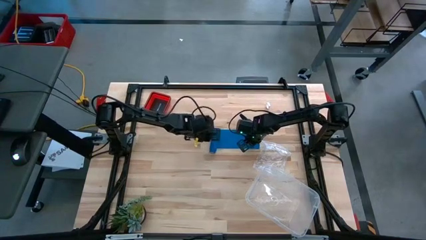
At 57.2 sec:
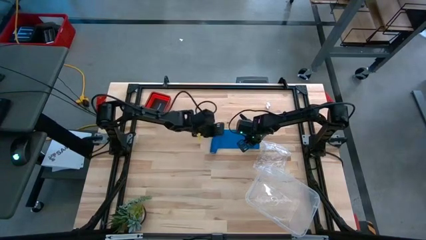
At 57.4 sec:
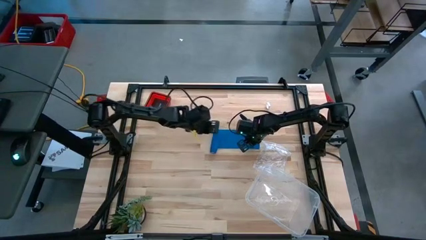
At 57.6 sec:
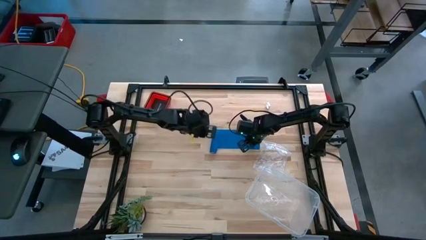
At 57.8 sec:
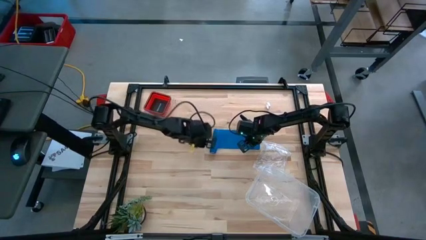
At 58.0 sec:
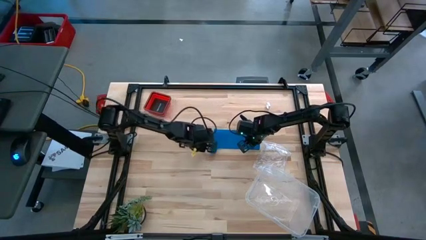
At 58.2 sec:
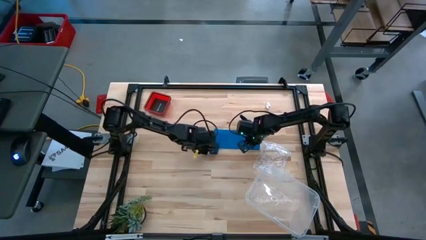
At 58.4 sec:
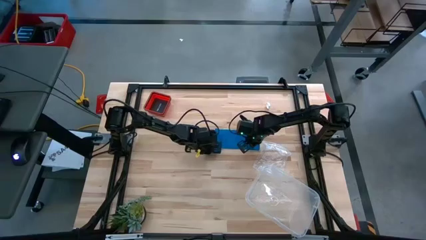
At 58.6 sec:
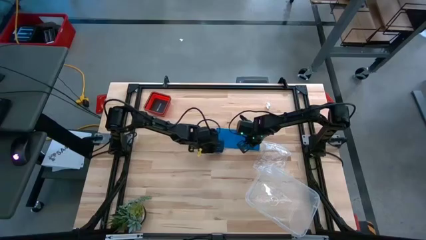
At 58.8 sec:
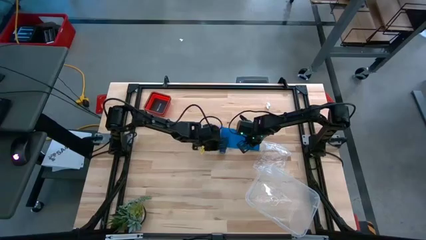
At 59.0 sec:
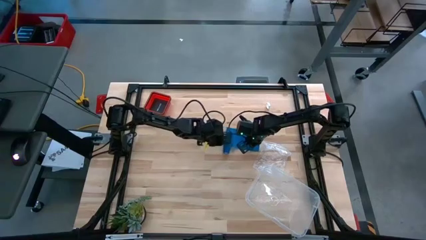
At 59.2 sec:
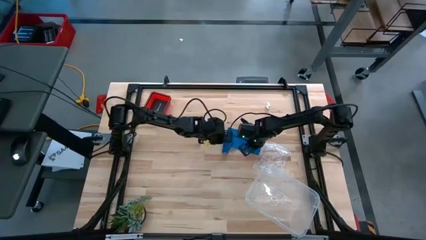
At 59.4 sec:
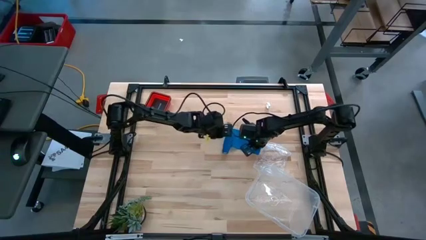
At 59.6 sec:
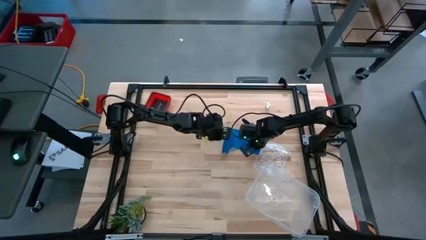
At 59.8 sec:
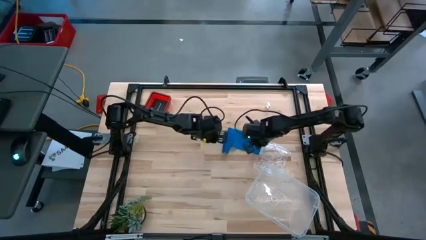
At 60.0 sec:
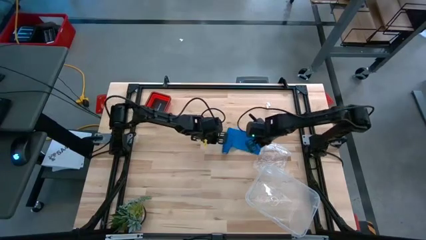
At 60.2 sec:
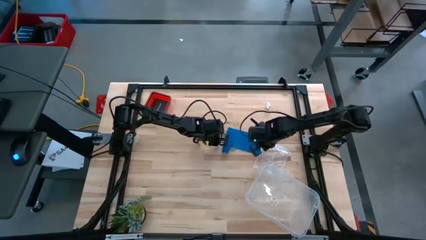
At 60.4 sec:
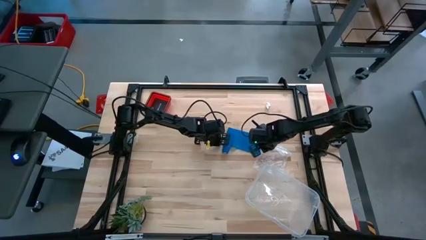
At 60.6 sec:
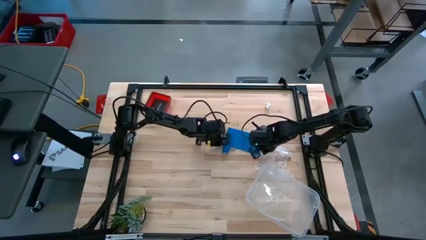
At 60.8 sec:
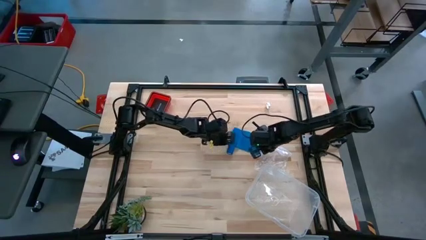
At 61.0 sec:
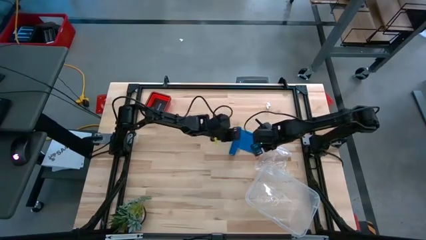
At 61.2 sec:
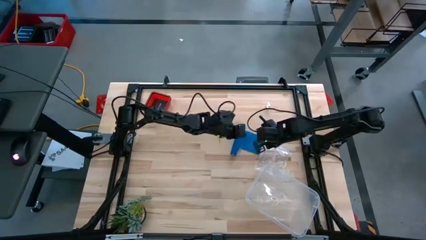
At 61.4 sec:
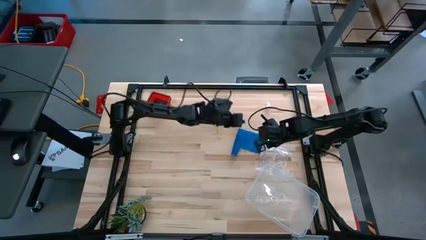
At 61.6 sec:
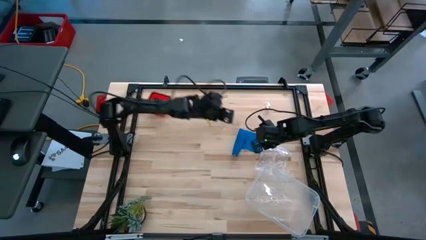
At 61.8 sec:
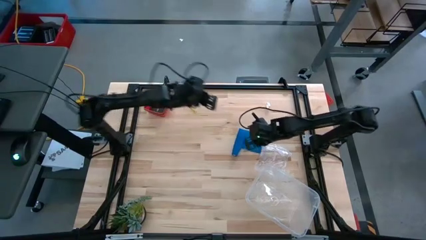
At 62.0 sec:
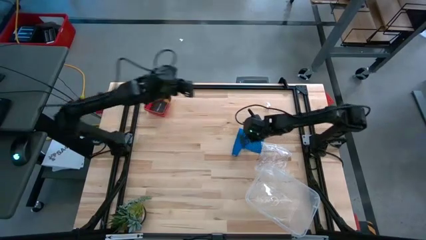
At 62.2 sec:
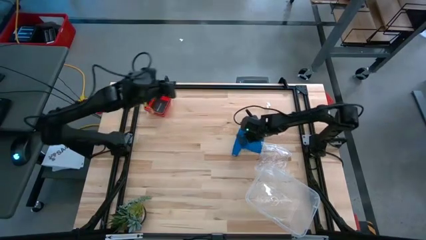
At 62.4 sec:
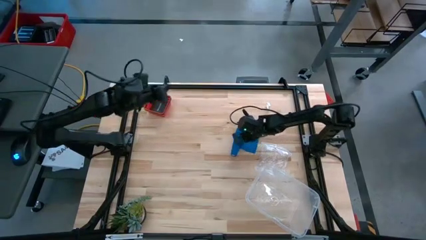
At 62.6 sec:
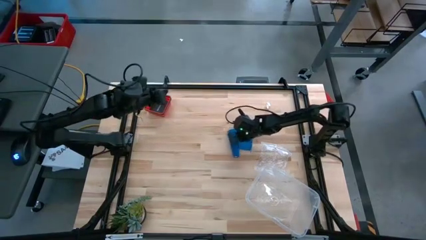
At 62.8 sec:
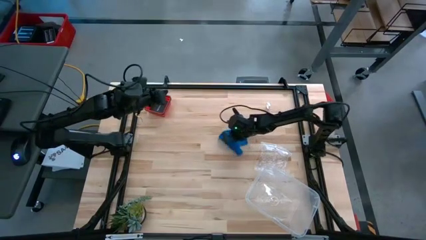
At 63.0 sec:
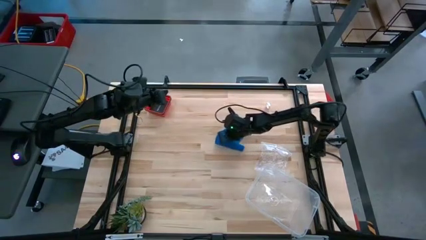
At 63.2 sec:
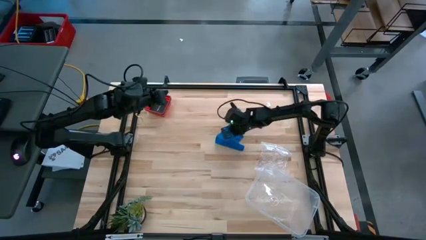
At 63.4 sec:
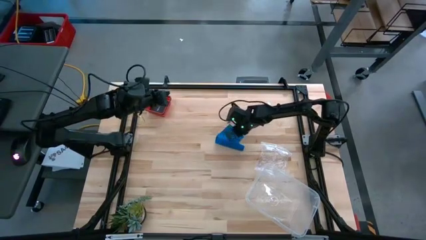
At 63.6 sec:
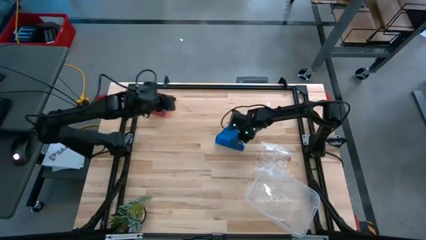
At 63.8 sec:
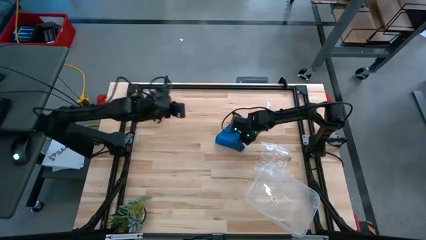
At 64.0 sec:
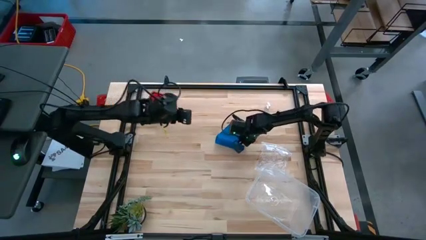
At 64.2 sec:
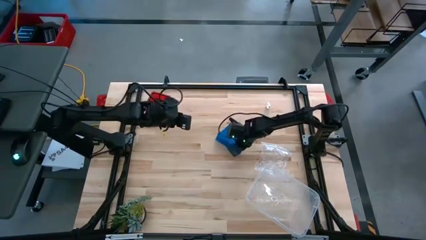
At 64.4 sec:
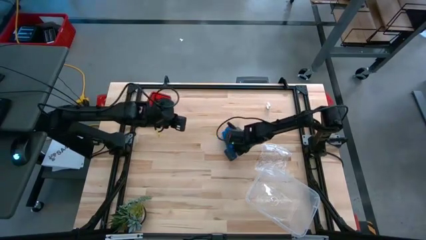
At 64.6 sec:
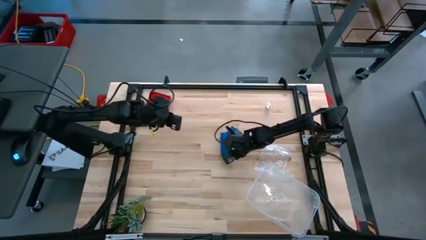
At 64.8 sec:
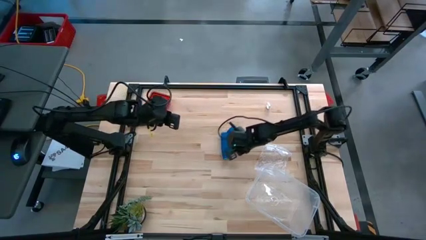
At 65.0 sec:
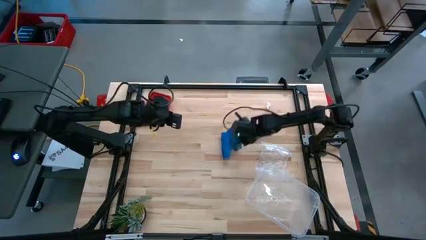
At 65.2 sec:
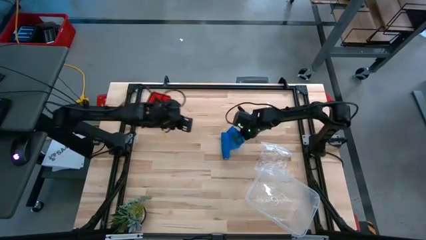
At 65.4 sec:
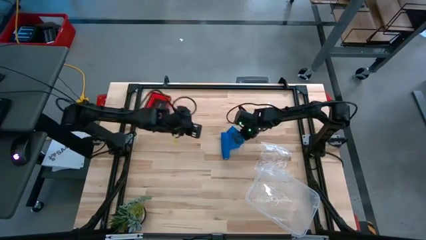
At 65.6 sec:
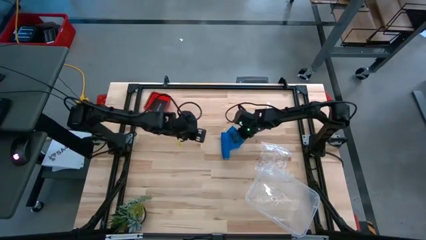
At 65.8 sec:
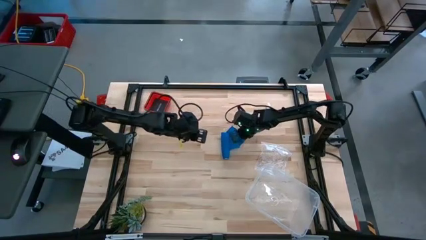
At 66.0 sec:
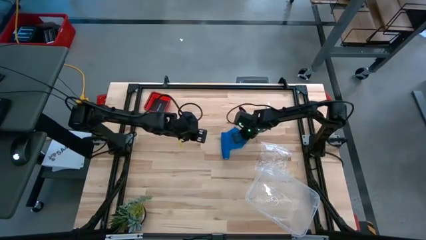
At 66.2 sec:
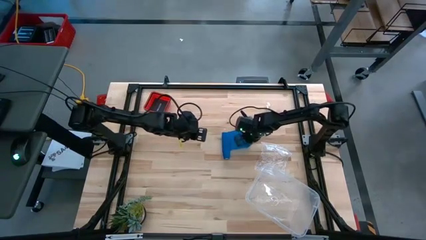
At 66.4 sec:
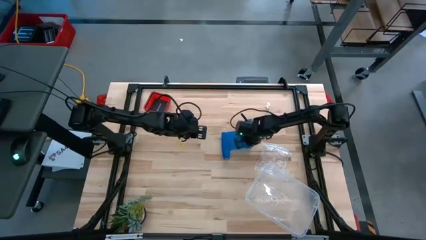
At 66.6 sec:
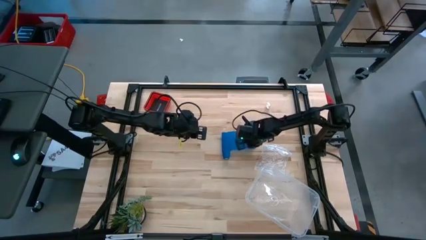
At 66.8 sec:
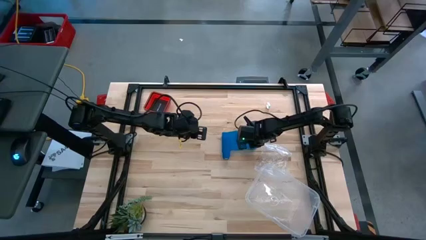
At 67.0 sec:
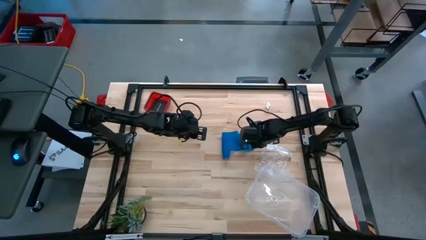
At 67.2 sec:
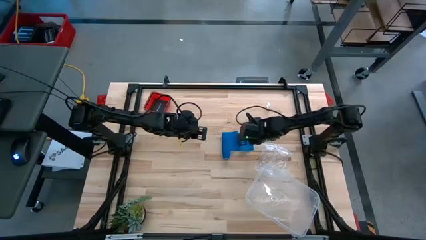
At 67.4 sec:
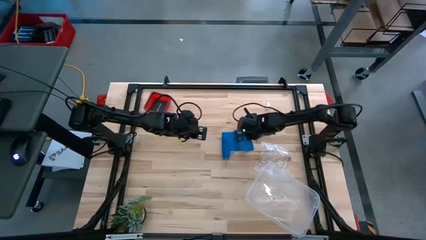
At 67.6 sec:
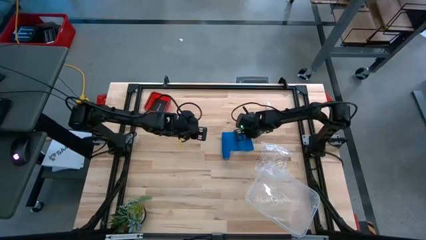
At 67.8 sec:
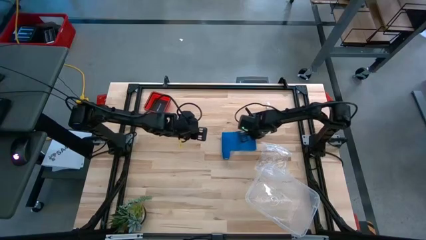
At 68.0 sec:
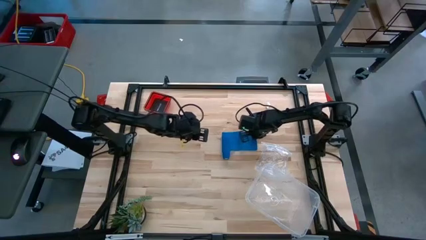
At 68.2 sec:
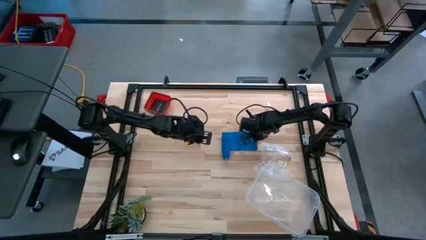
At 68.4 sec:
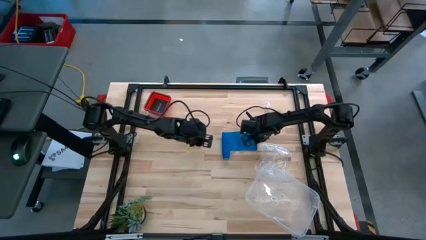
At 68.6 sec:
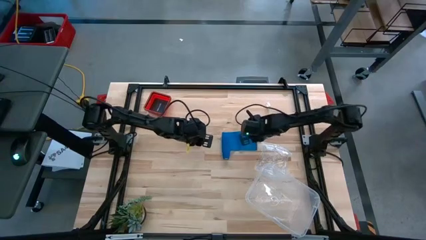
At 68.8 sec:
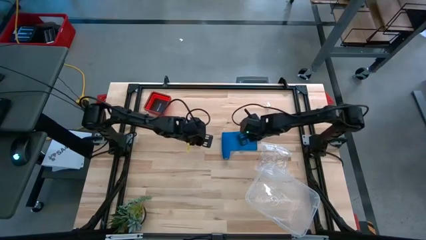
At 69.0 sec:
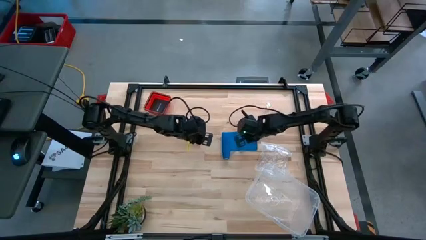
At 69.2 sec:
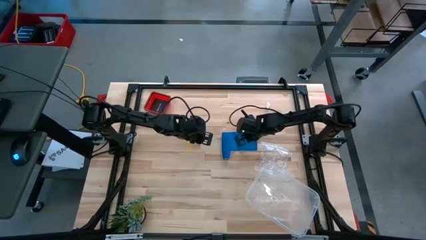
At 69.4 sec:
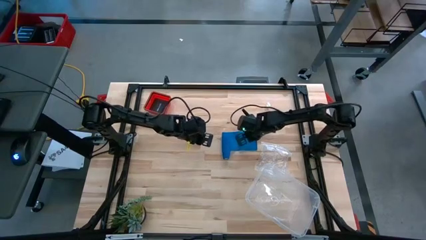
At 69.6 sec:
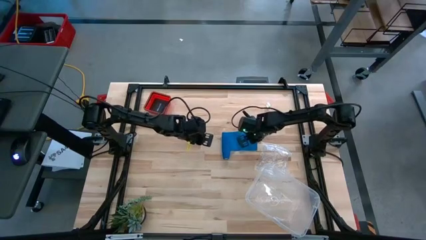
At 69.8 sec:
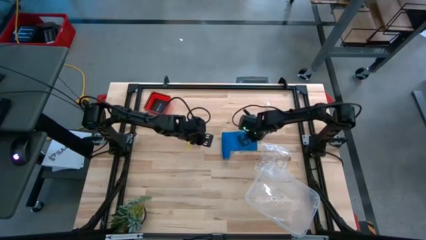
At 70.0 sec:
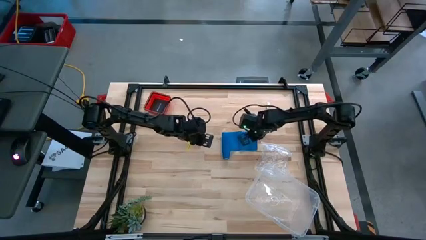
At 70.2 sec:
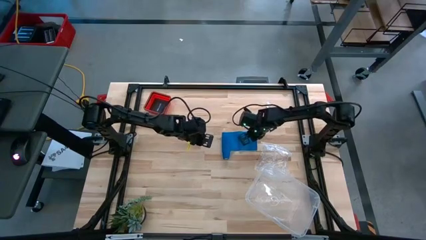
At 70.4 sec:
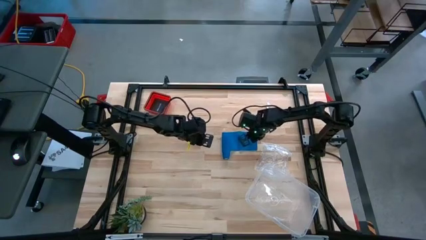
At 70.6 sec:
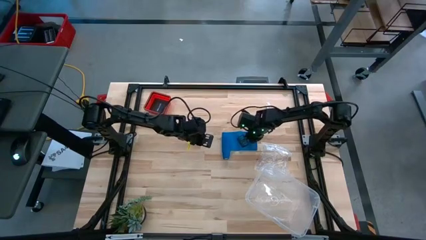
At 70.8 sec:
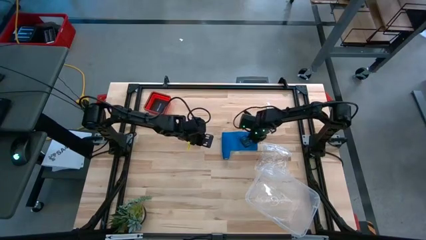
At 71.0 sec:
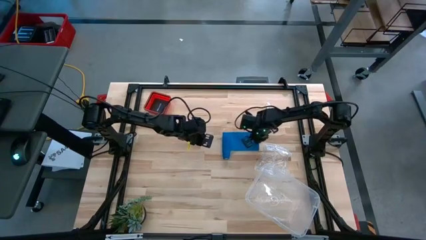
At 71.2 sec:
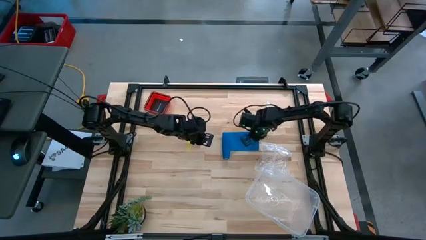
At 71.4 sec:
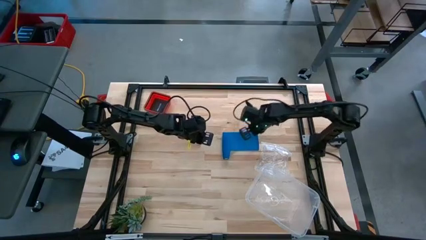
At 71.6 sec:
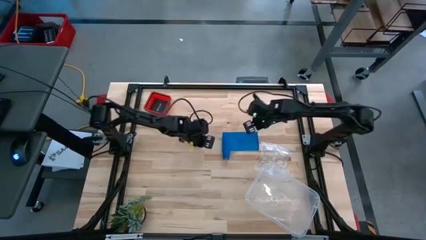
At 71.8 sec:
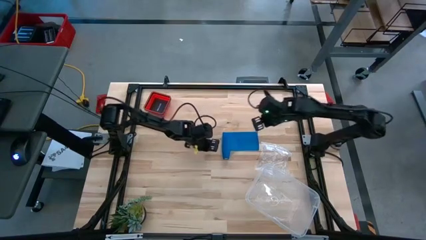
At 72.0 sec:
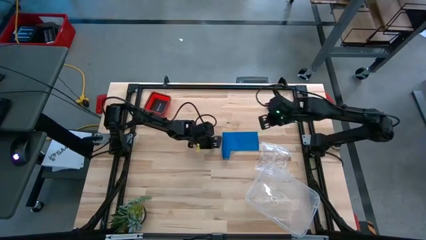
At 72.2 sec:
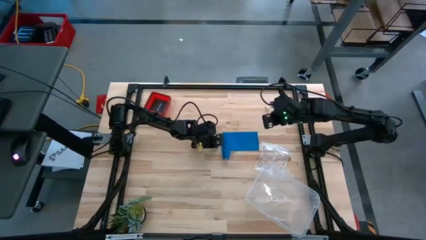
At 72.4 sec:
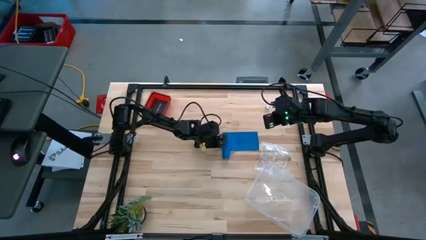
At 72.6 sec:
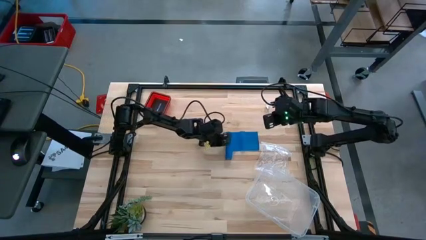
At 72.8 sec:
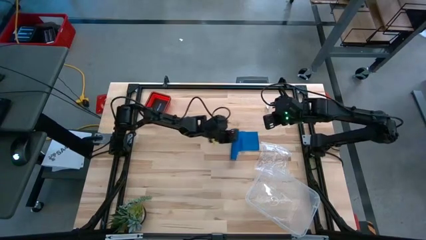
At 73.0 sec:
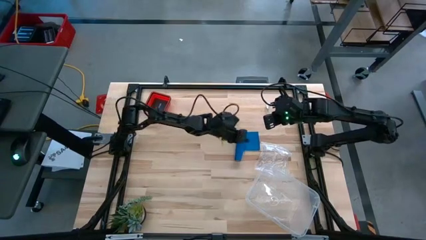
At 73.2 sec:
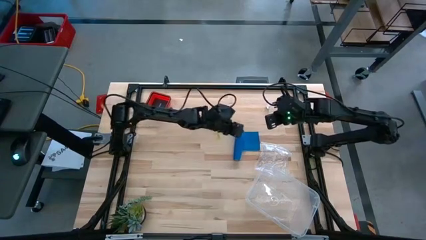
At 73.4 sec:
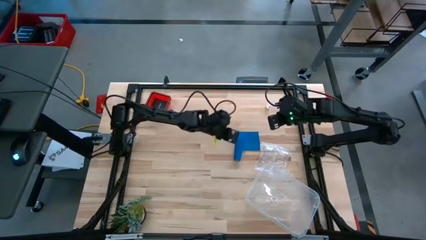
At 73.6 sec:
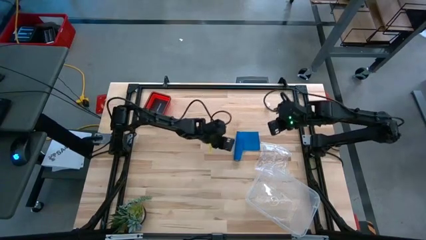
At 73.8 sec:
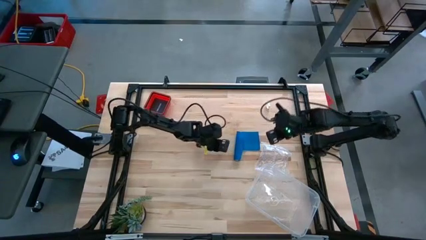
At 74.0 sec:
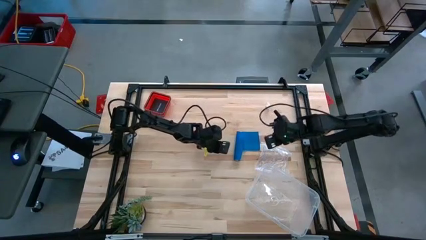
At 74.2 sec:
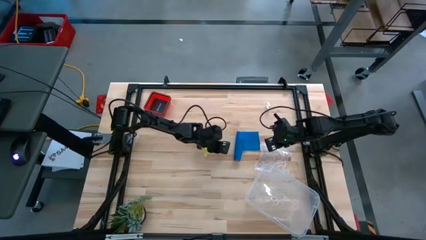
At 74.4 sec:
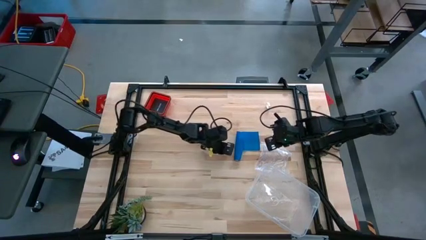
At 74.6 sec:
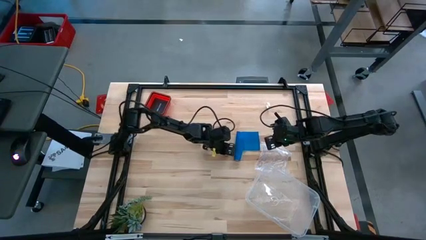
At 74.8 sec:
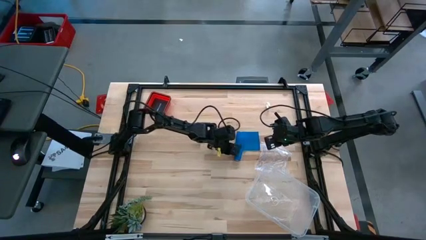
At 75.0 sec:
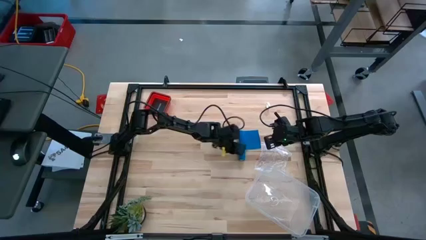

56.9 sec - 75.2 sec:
Task: Roll bandage
Roll the blue bandage
